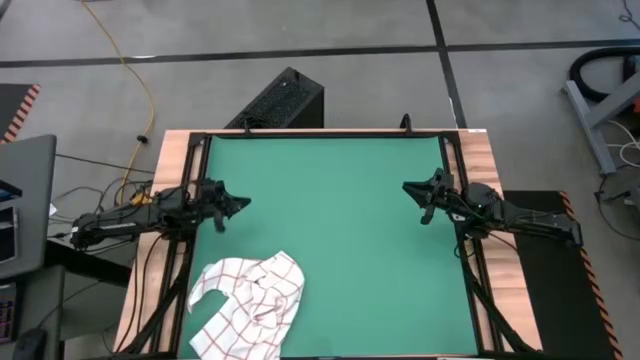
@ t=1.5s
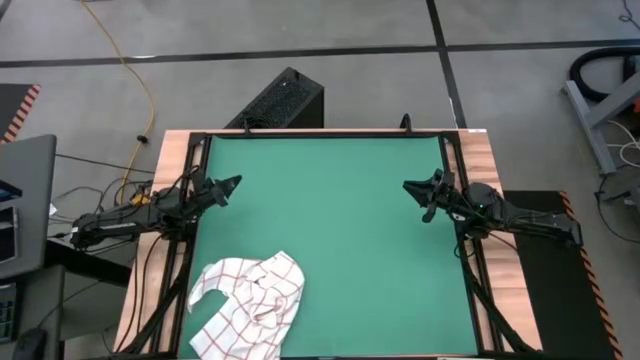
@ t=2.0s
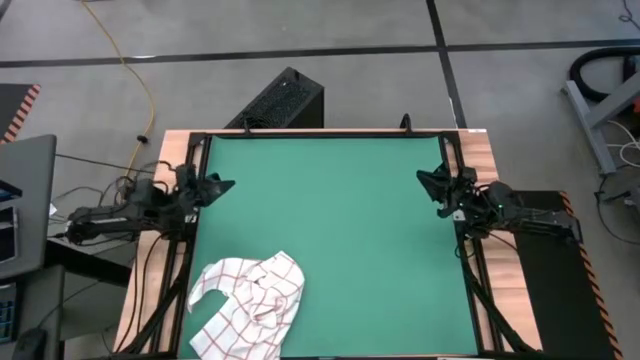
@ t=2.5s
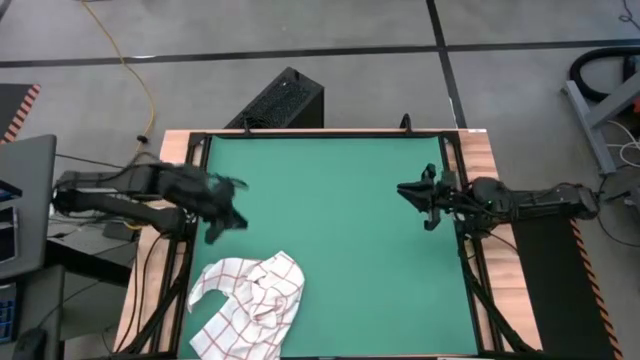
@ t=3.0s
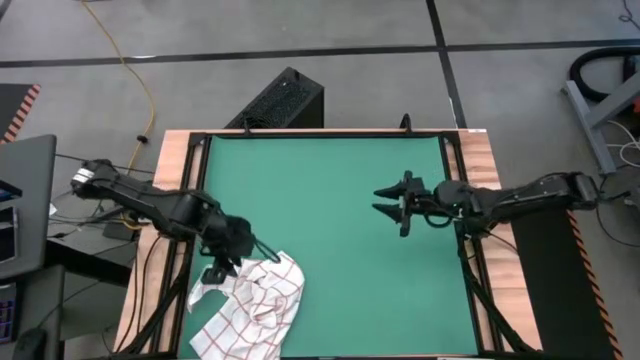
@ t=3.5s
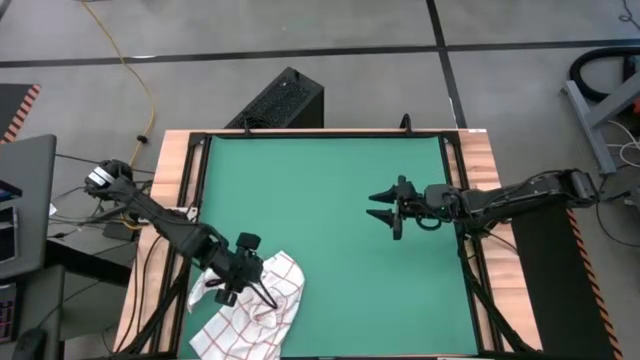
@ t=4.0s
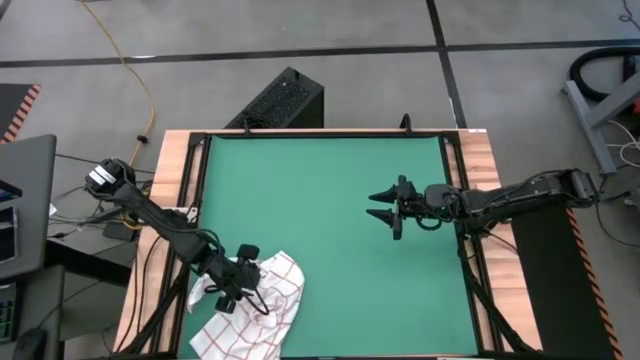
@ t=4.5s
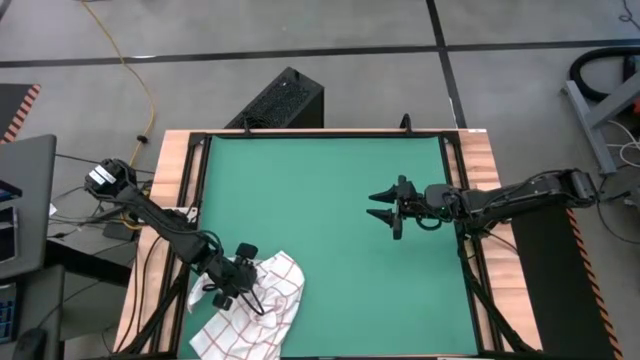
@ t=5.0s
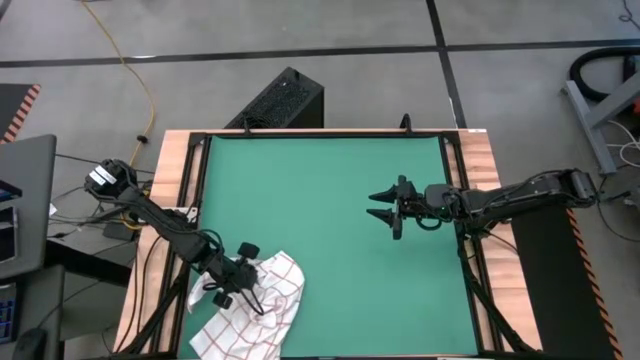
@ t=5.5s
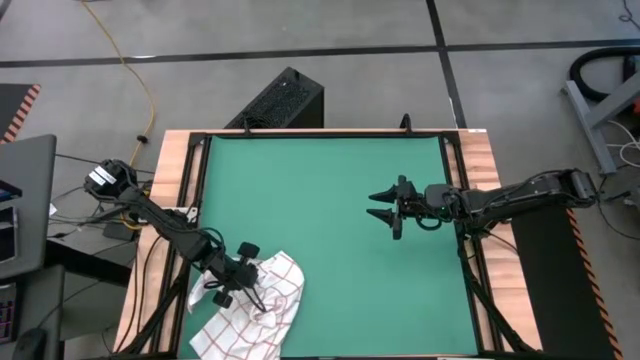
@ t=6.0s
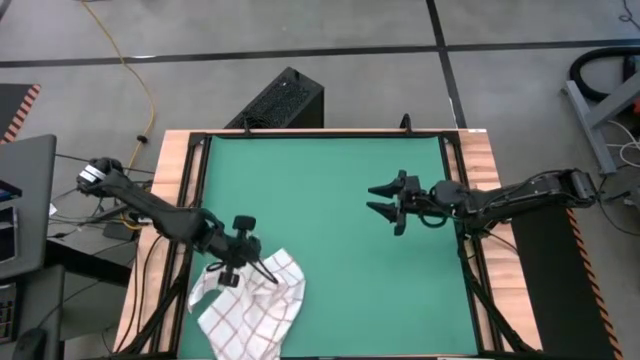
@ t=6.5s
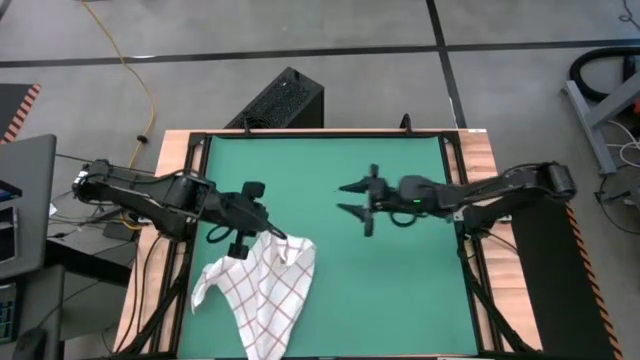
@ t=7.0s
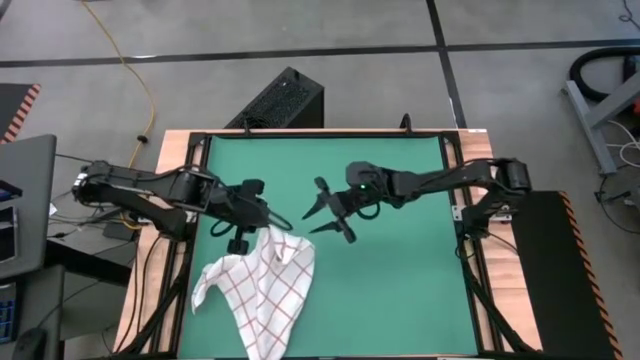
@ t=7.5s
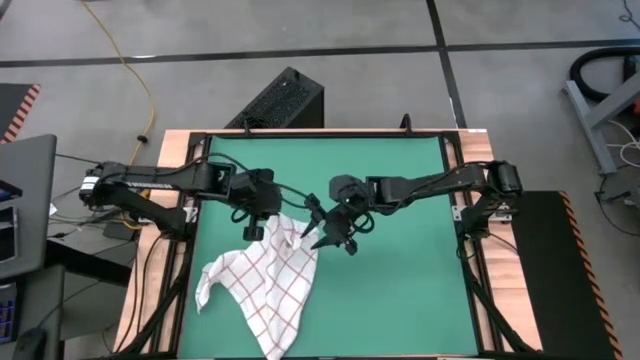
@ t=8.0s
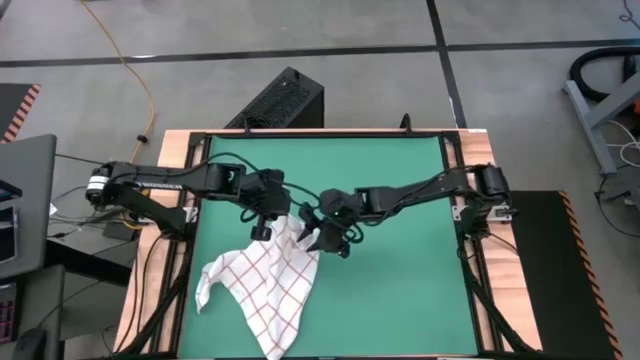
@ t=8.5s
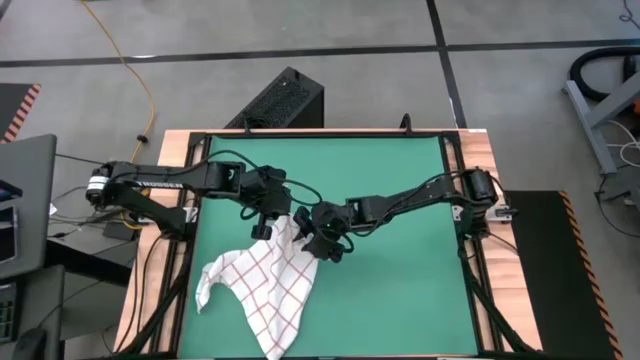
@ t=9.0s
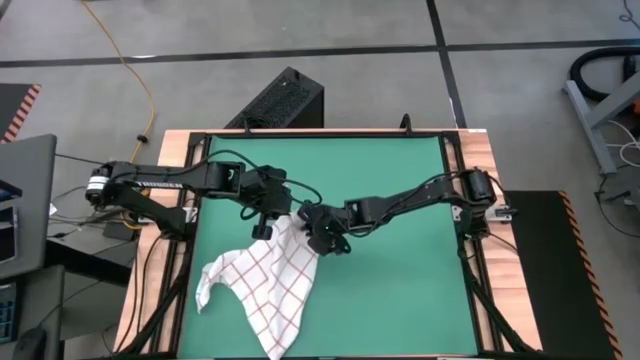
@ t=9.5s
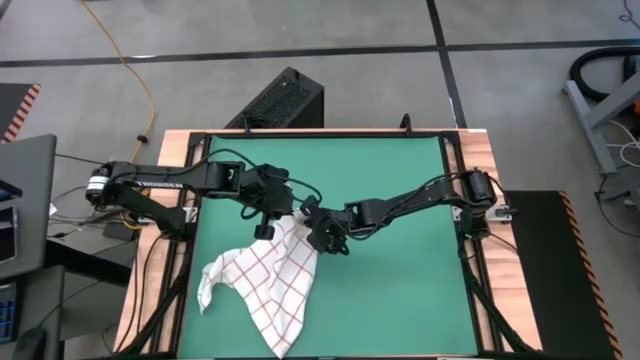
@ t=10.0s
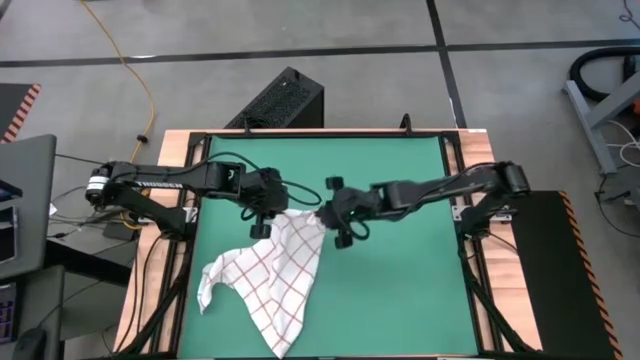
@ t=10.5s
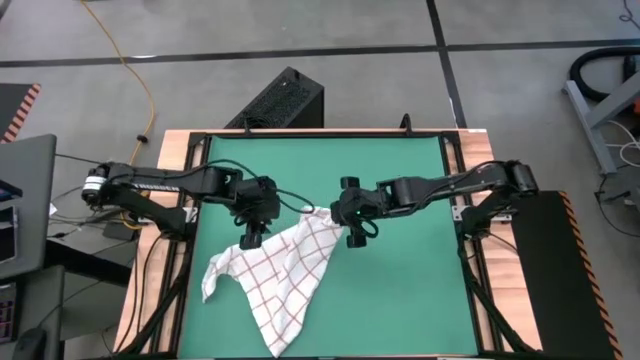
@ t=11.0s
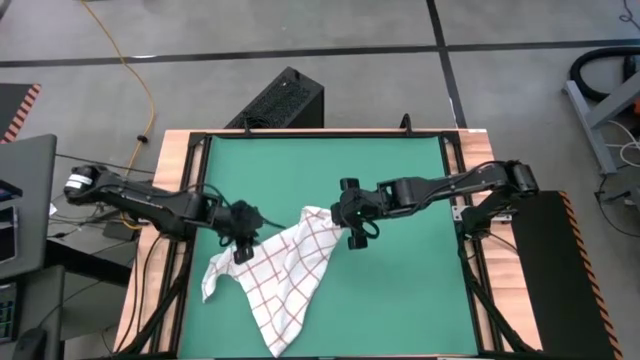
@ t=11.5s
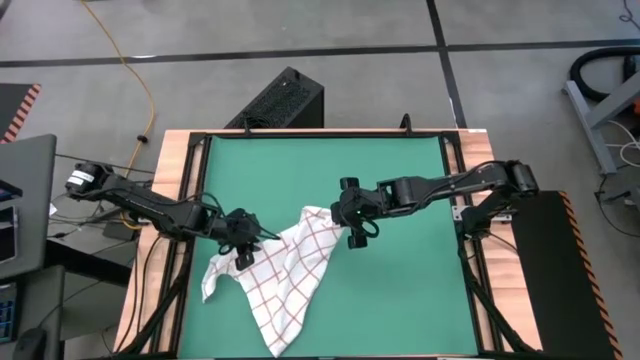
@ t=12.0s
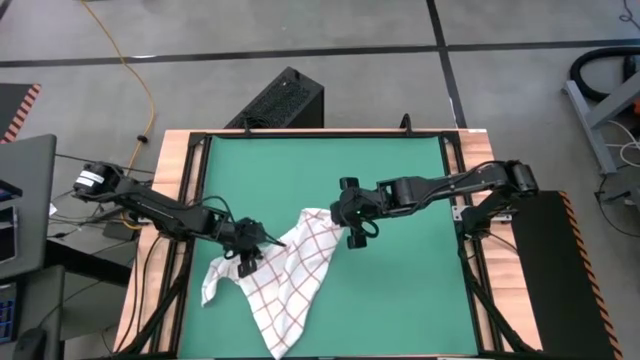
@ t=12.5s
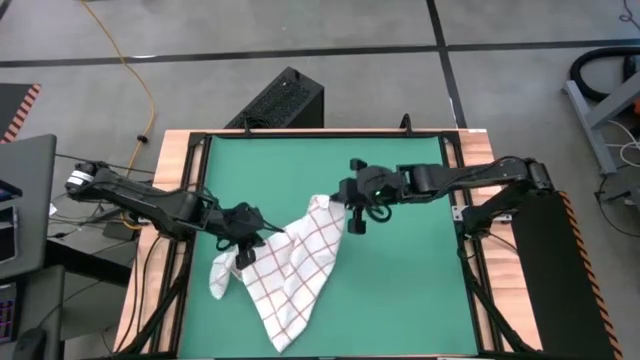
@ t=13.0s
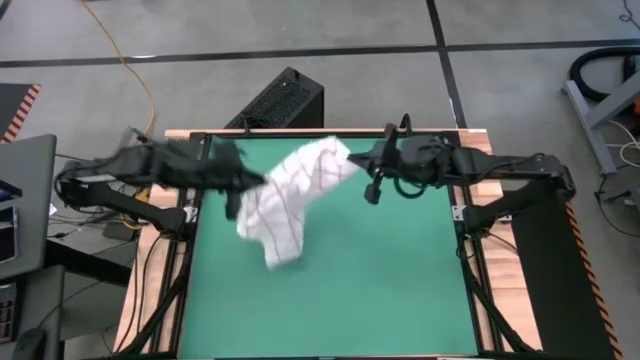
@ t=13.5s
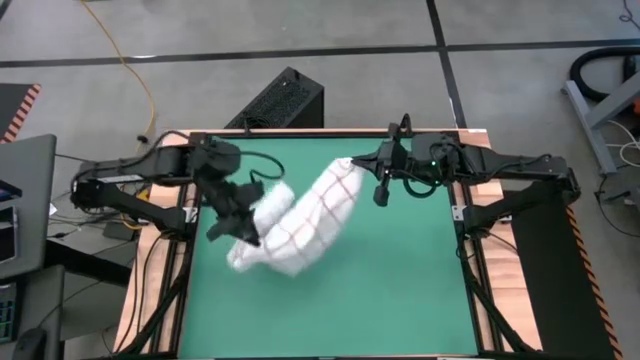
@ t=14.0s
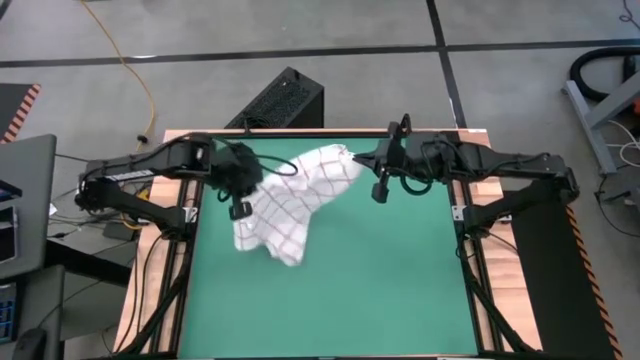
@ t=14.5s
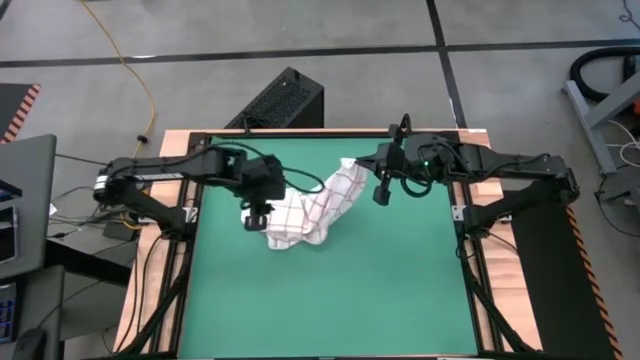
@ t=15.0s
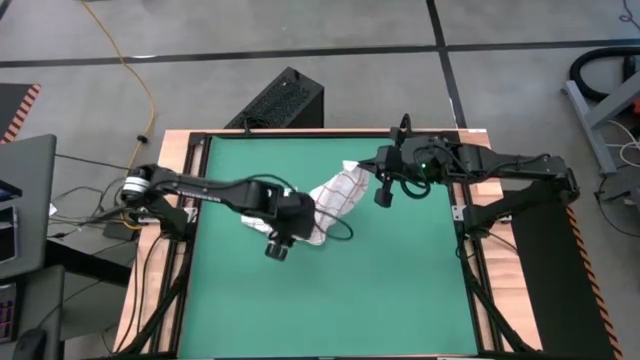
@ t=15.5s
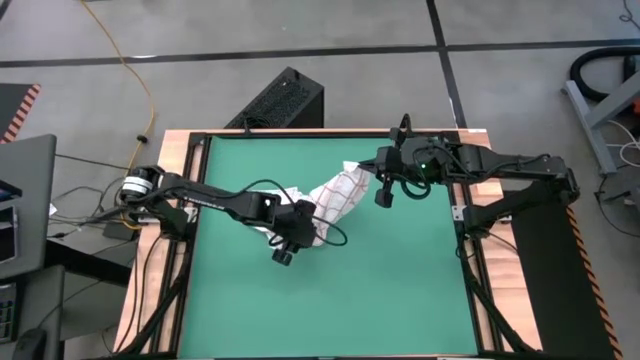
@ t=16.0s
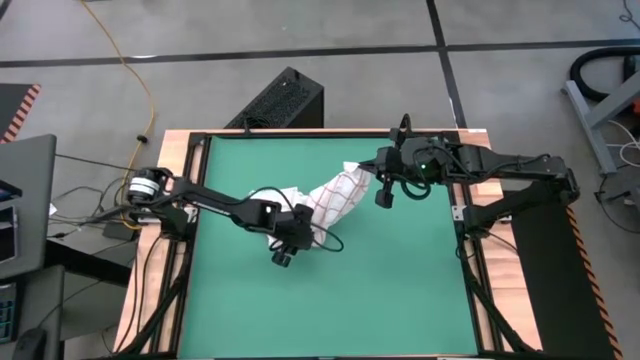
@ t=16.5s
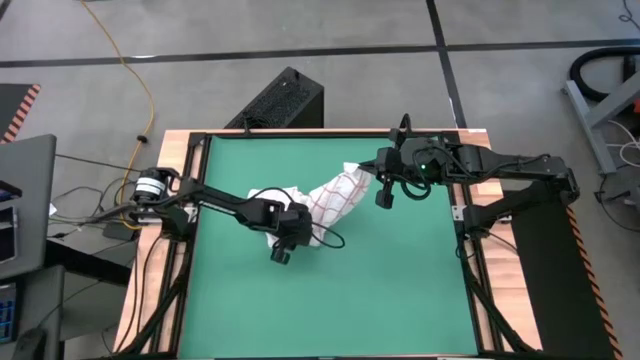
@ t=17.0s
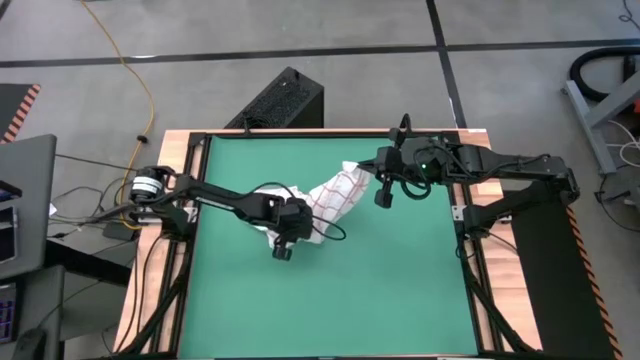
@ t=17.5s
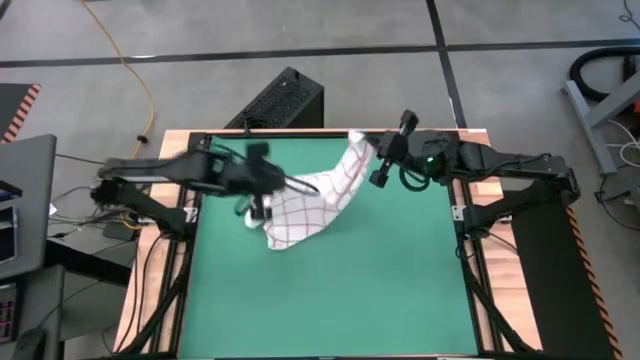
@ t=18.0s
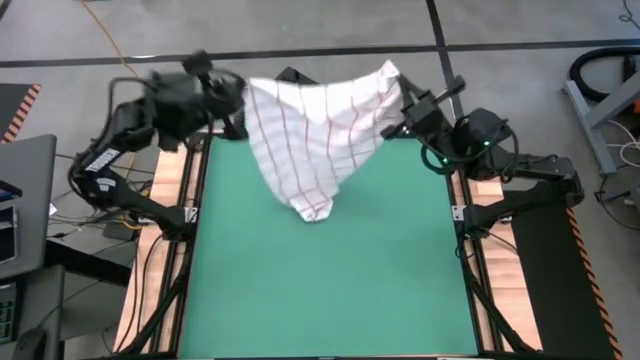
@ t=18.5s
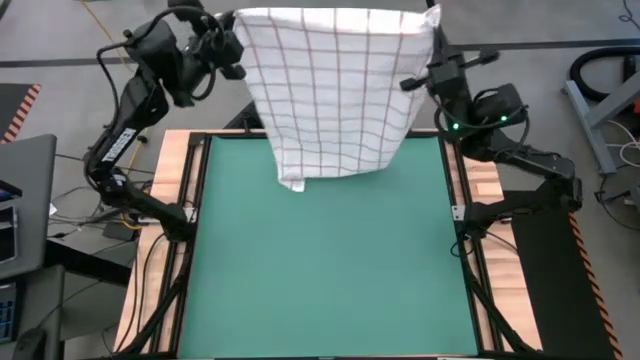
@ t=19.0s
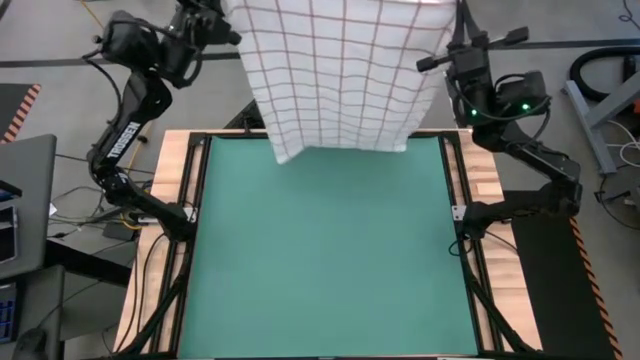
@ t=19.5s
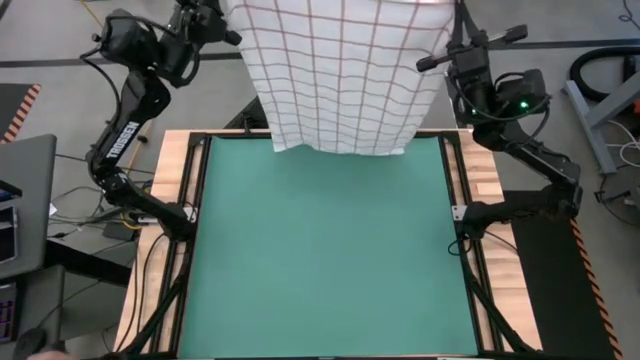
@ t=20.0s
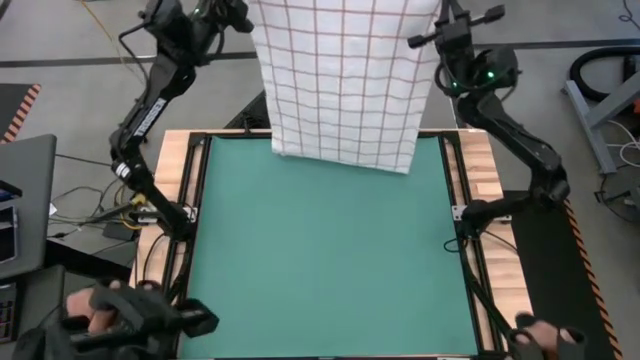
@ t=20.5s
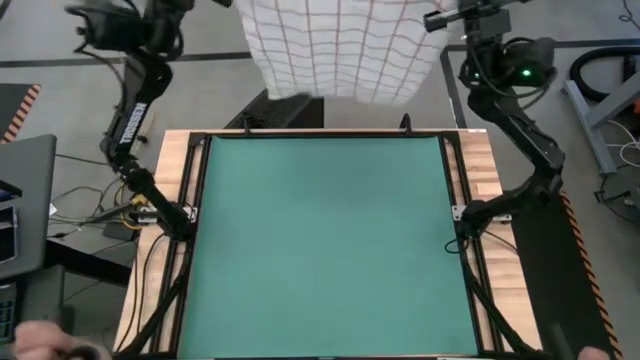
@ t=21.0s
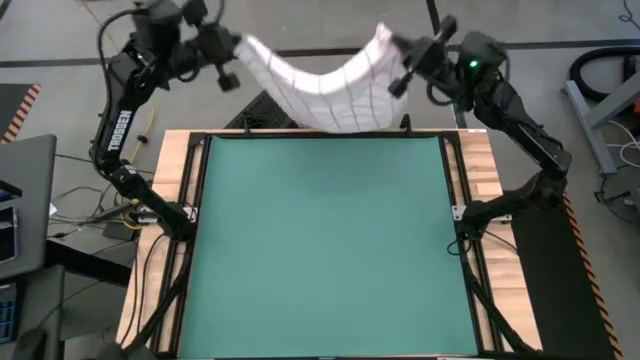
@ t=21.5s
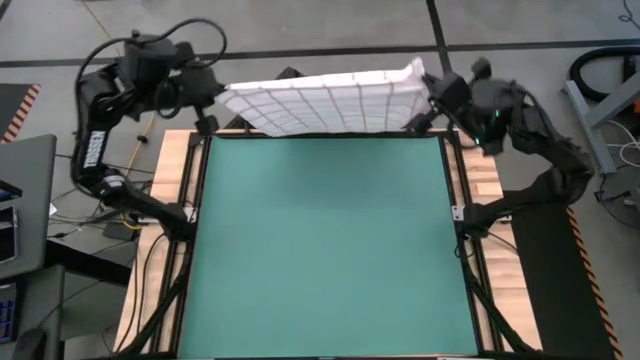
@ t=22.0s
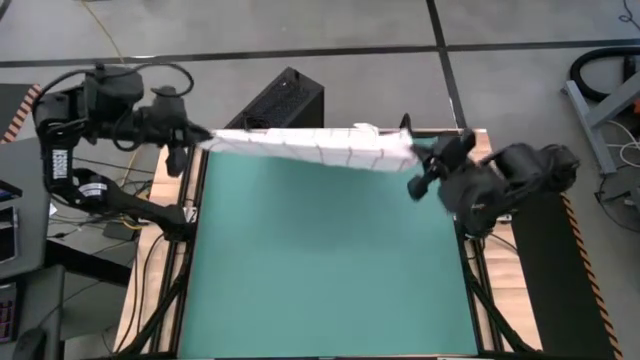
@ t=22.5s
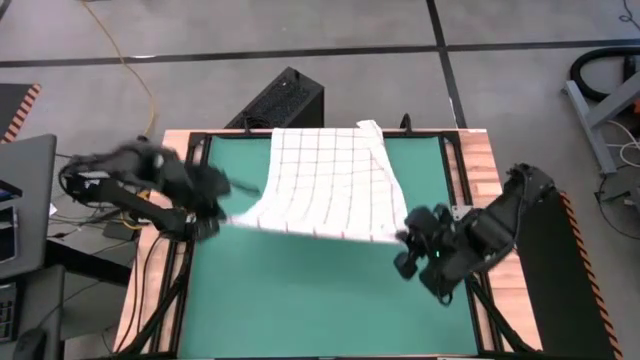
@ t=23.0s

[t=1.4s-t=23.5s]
Task: Roll towel into tight, uniform cylinder
Roll the white patterned towel
